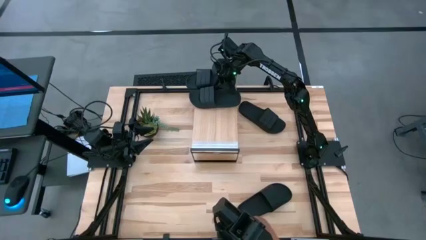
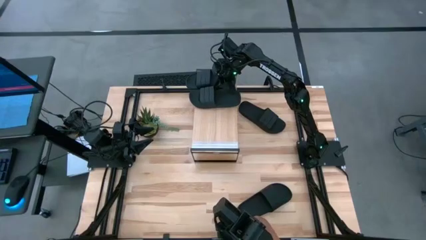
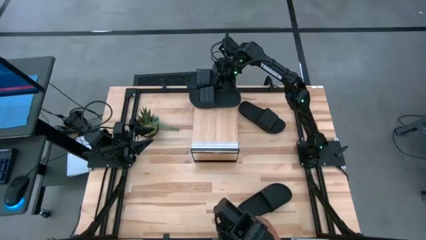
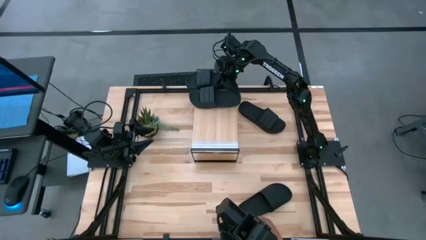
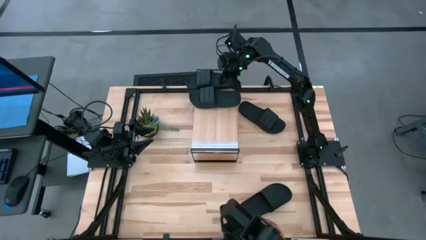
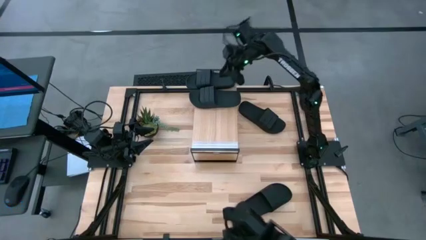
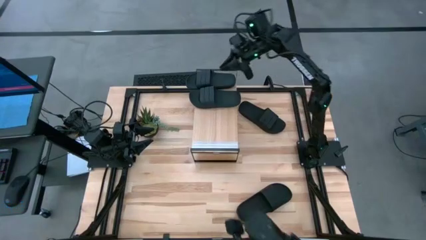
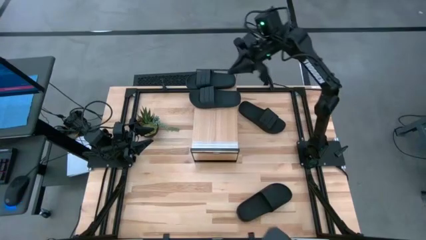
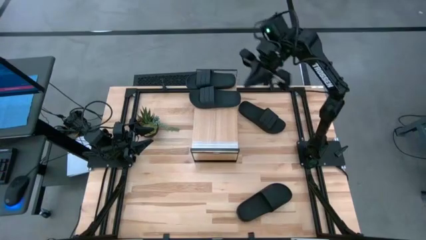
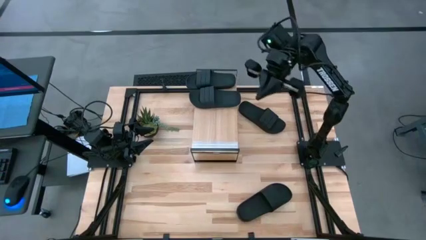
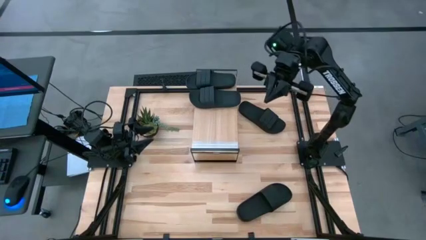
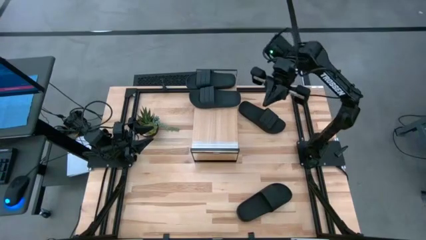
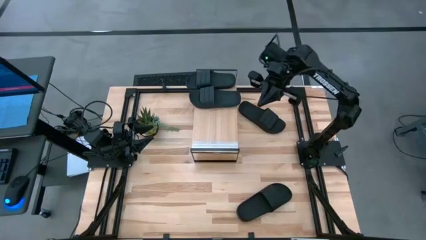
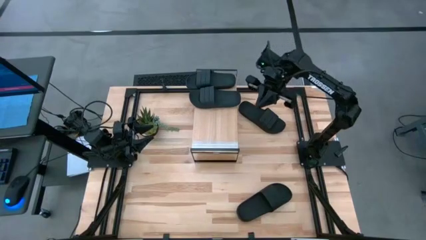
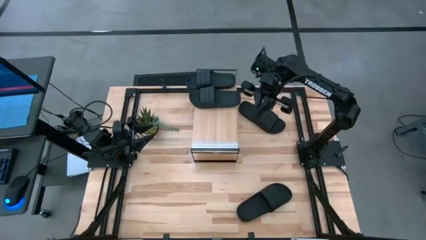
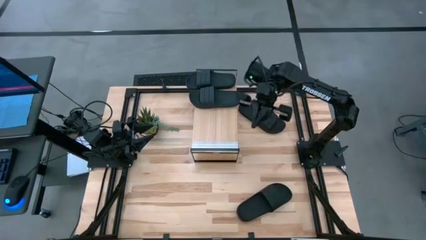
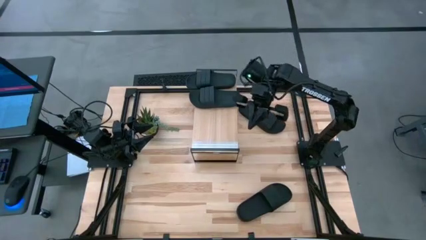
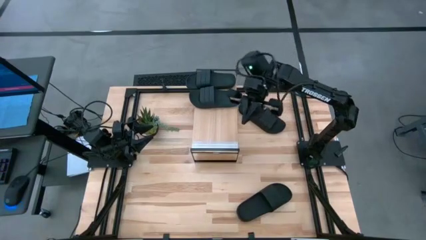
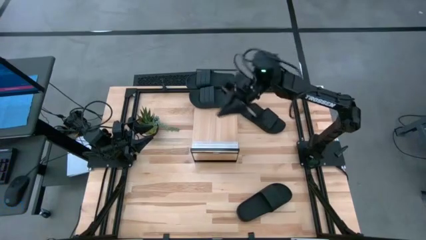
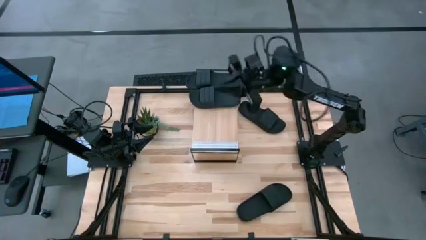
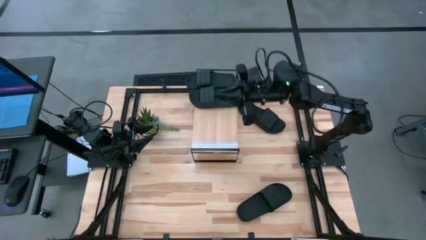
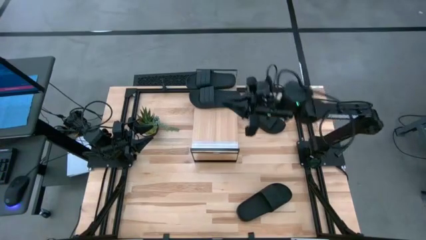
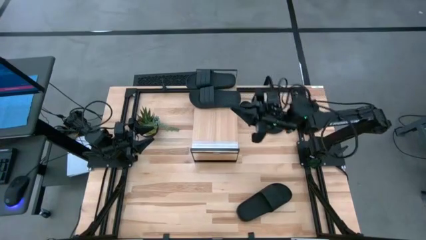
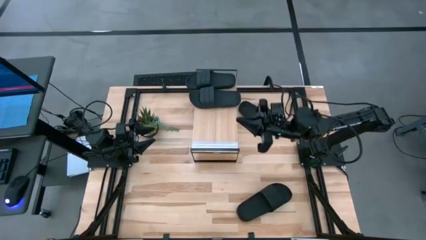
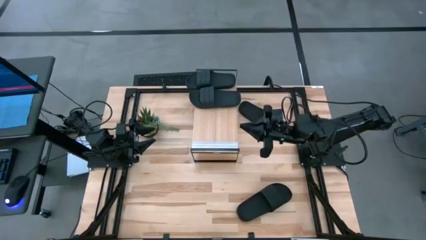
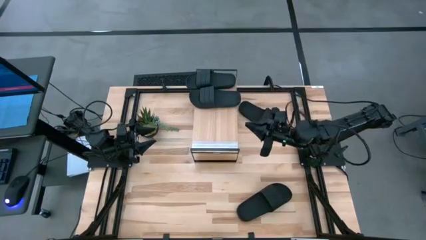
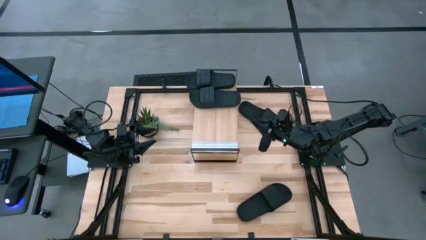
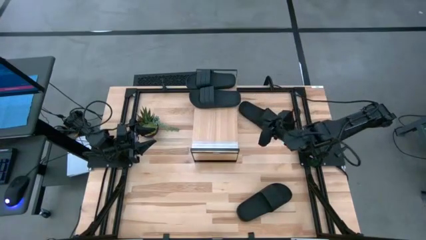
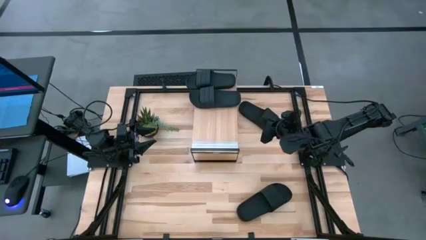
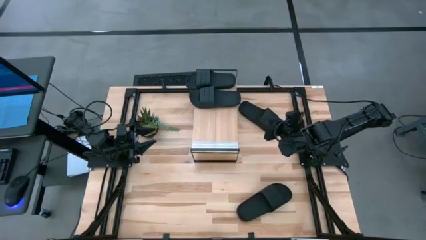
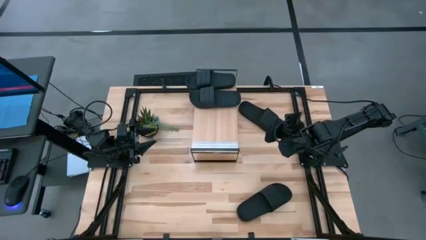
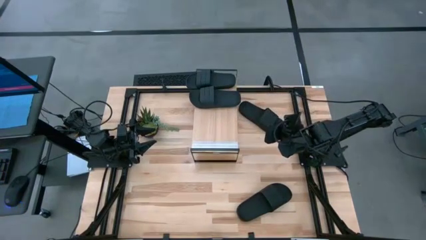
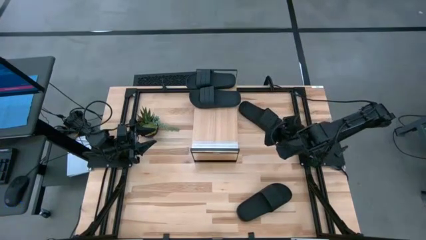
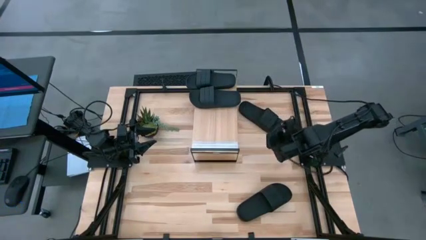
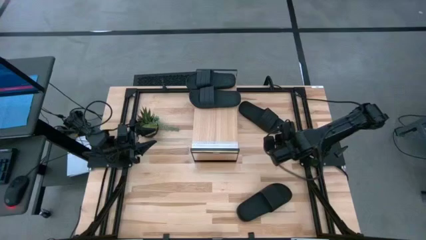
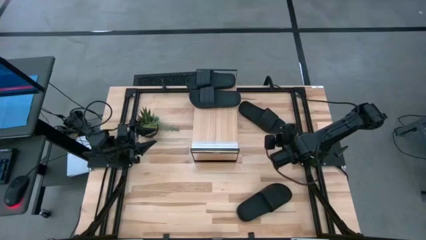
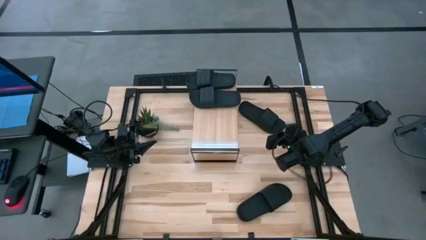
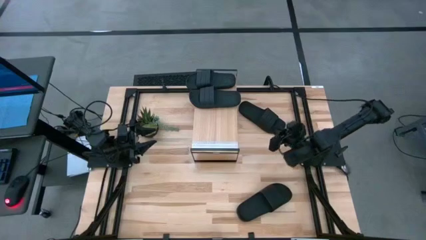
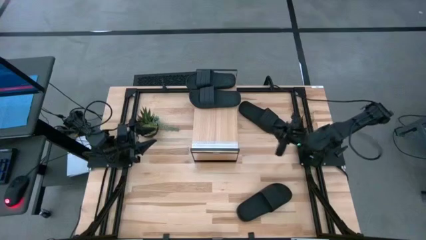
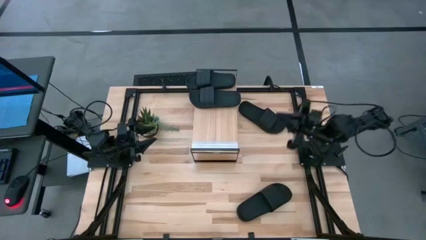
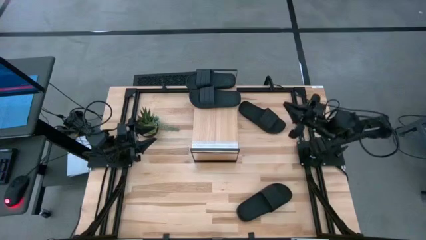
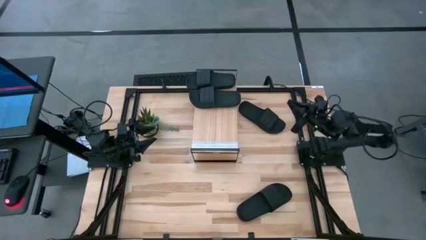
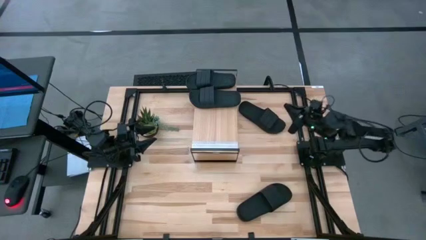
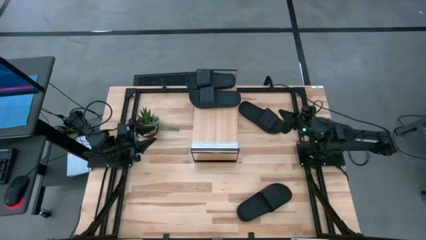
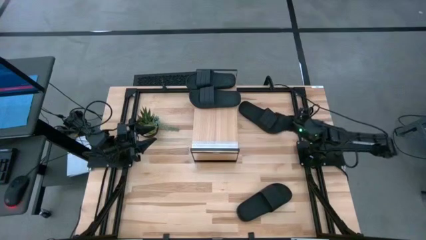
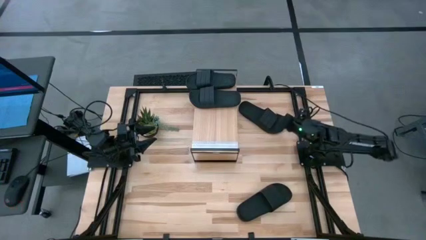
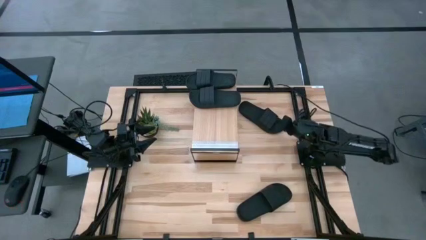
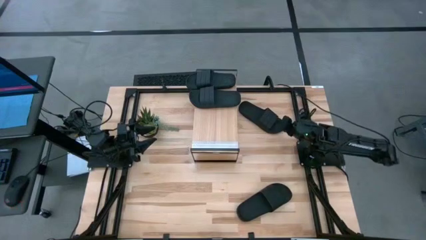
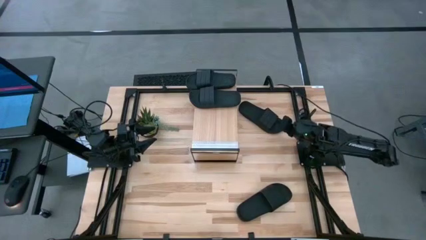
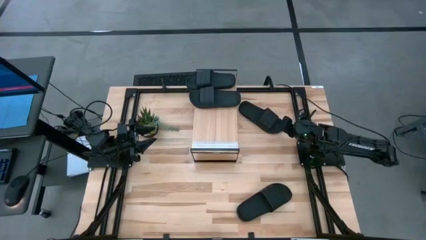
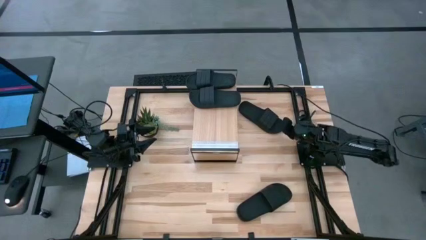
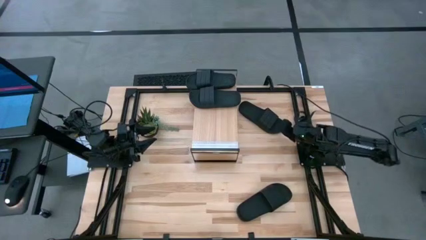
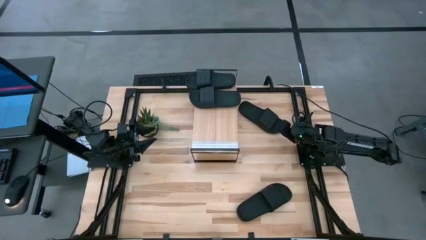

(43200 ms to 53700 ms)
Task: Pick and place slides into the shelf
Put the top black slide on the shelf
